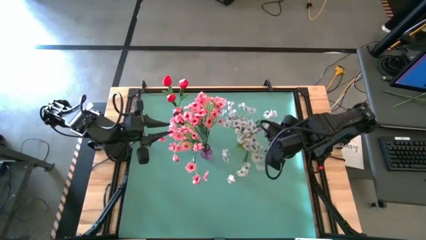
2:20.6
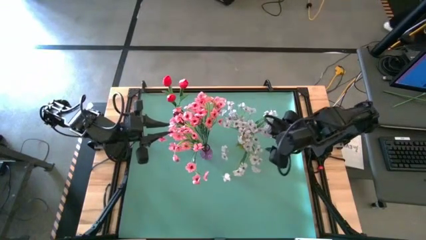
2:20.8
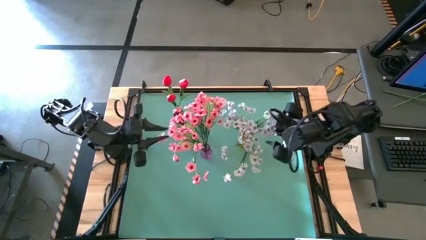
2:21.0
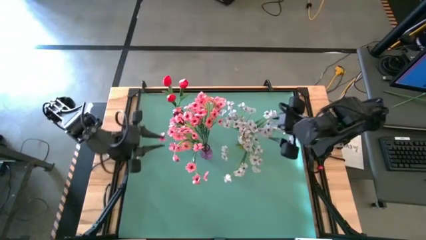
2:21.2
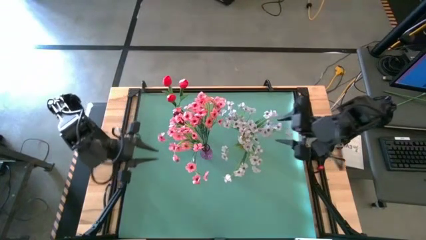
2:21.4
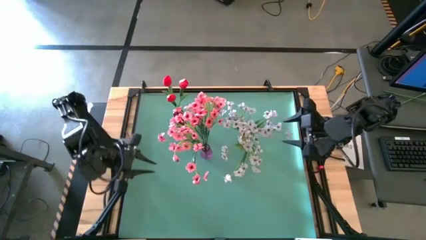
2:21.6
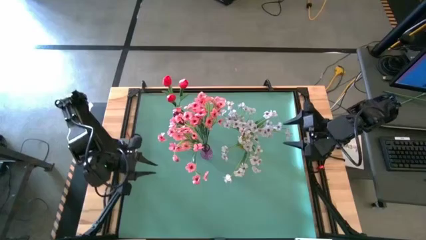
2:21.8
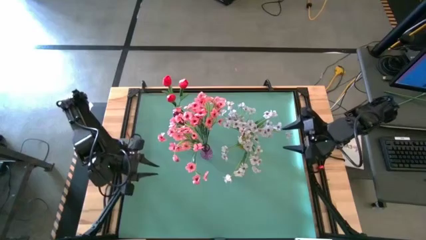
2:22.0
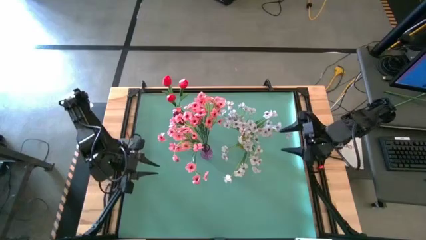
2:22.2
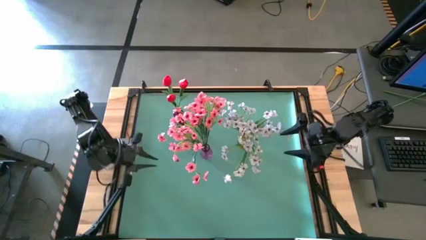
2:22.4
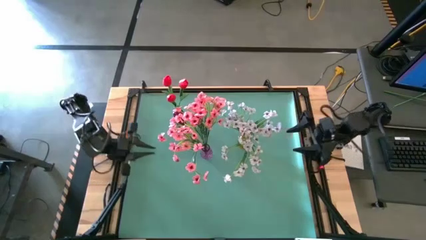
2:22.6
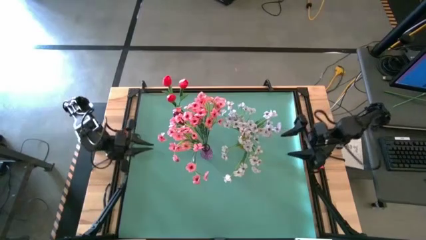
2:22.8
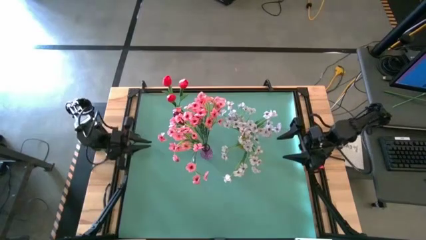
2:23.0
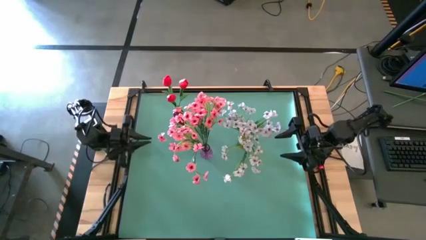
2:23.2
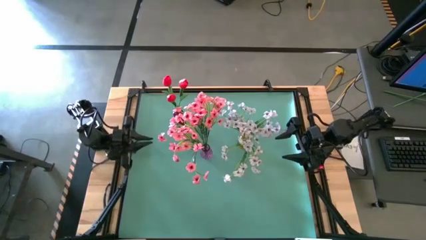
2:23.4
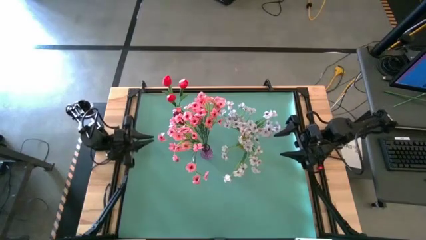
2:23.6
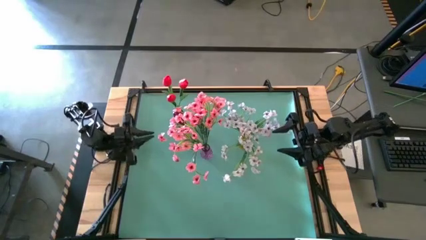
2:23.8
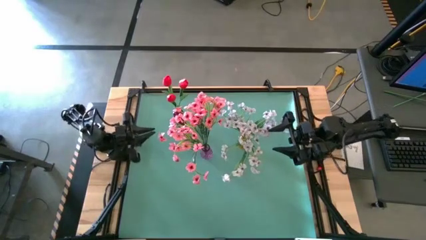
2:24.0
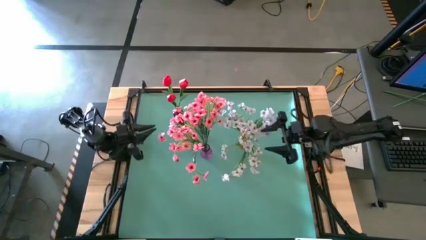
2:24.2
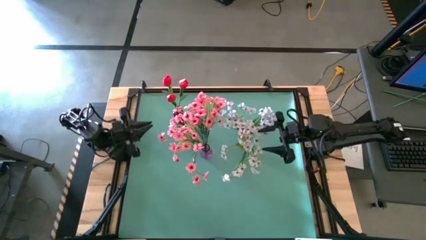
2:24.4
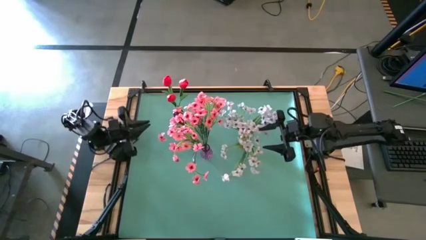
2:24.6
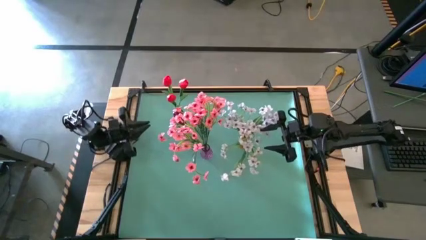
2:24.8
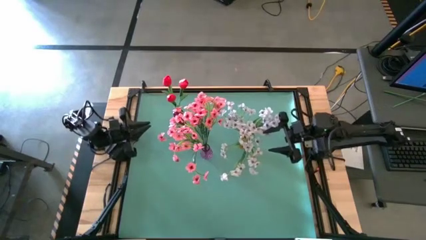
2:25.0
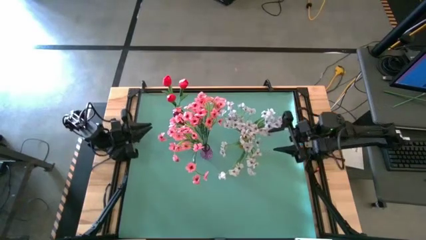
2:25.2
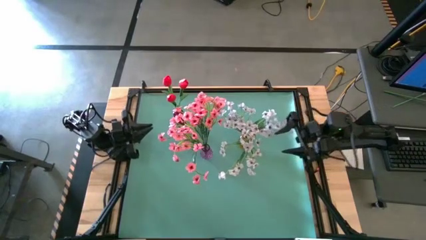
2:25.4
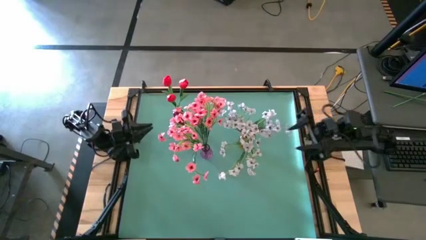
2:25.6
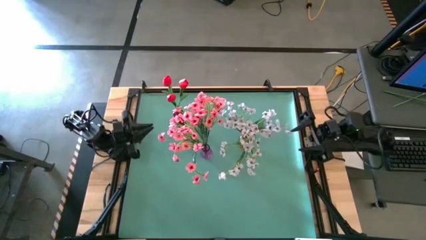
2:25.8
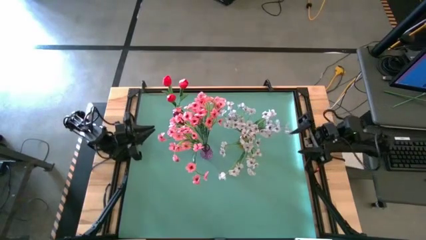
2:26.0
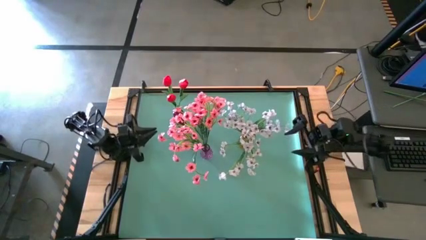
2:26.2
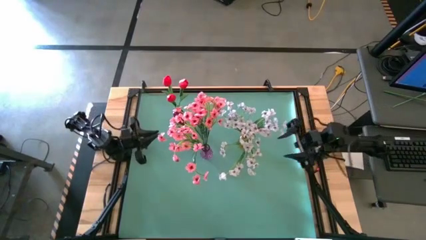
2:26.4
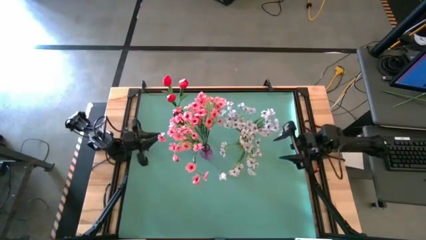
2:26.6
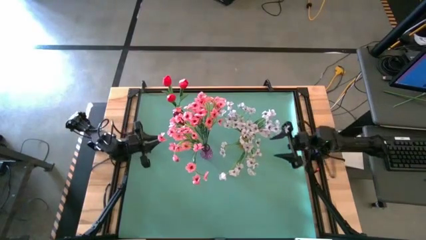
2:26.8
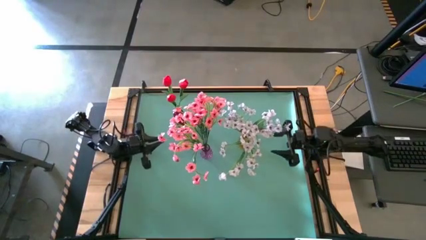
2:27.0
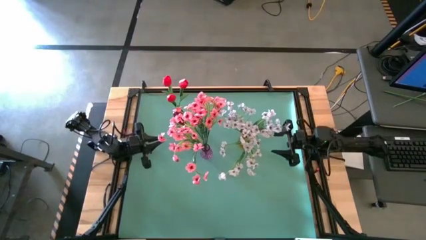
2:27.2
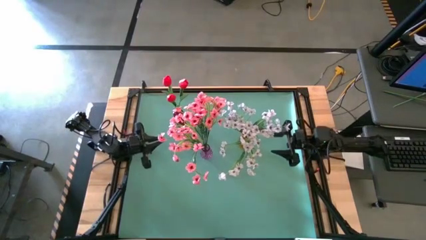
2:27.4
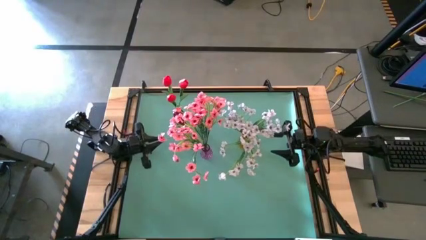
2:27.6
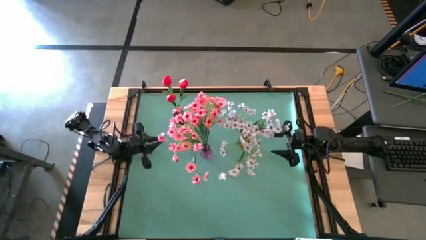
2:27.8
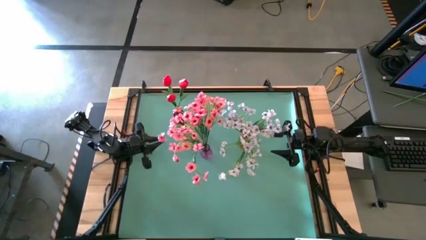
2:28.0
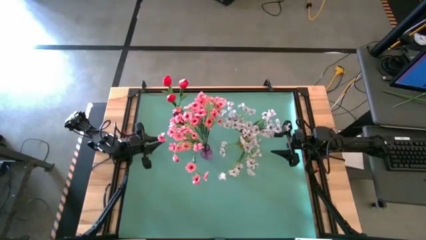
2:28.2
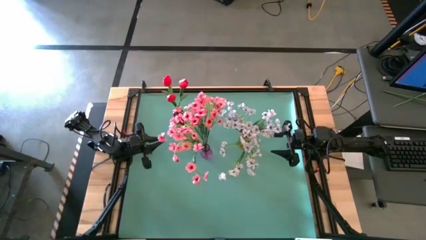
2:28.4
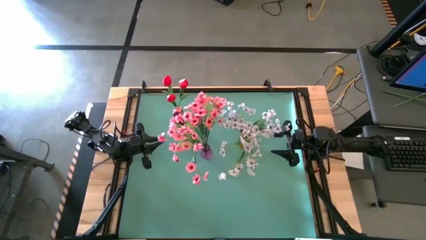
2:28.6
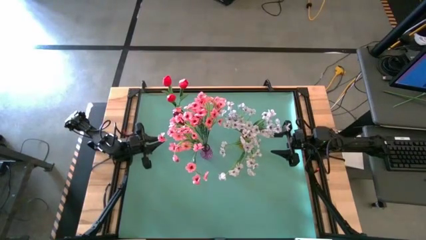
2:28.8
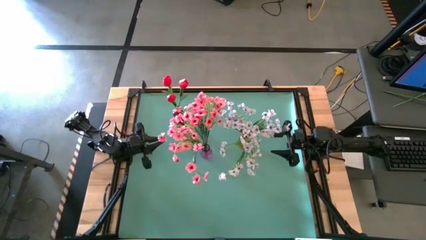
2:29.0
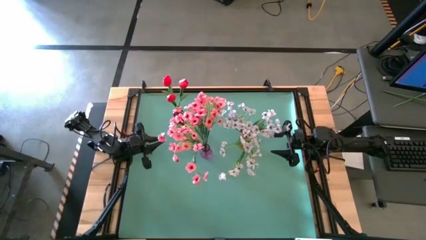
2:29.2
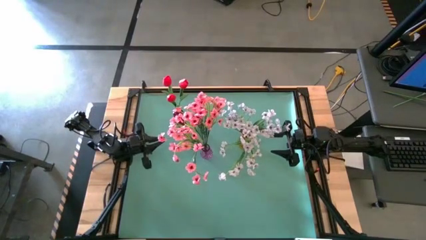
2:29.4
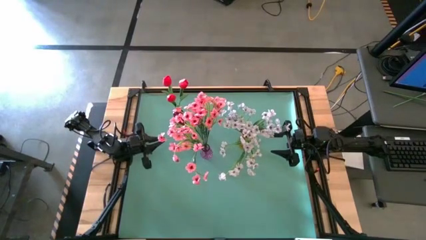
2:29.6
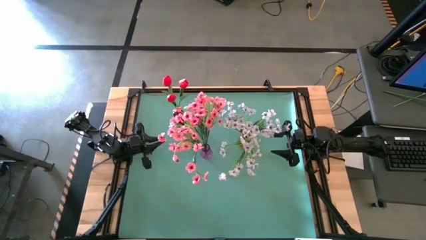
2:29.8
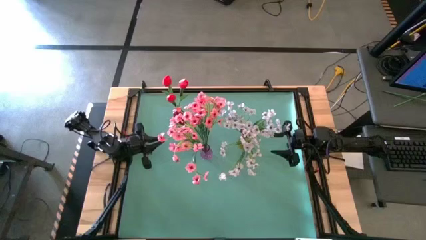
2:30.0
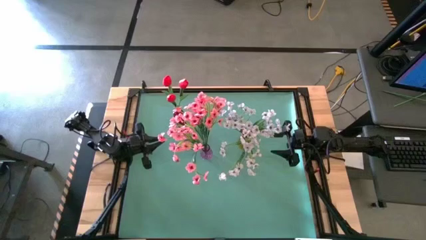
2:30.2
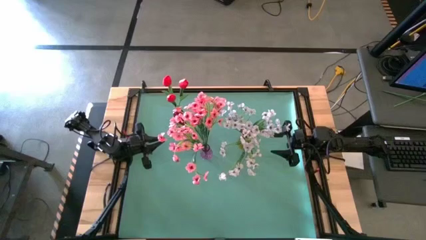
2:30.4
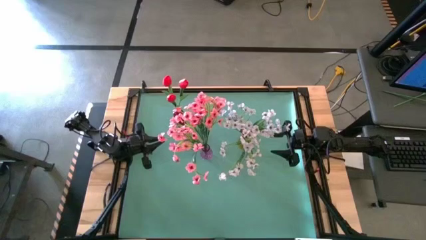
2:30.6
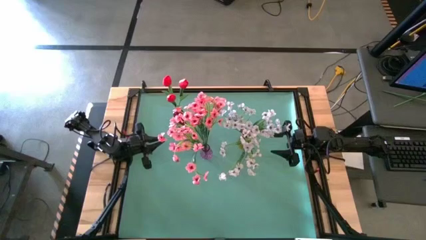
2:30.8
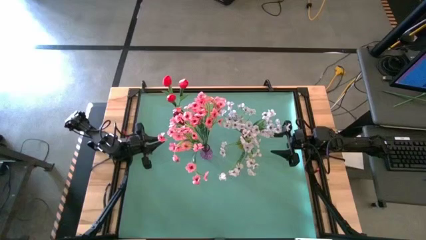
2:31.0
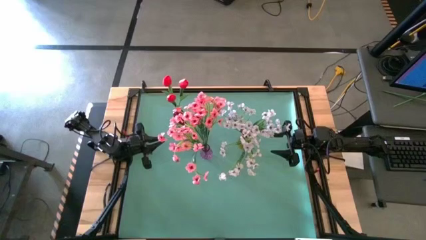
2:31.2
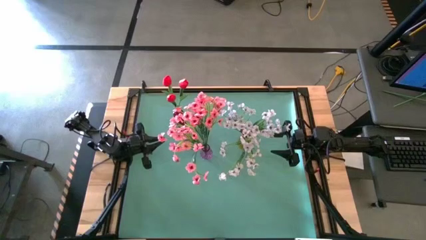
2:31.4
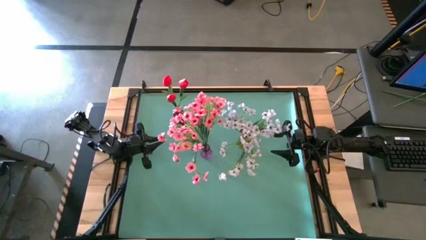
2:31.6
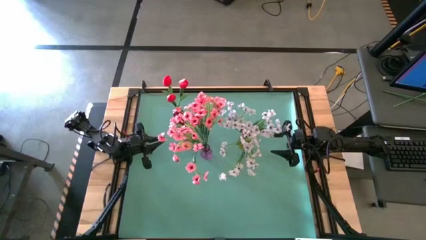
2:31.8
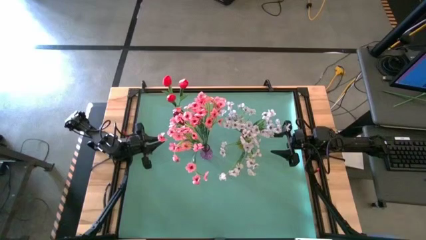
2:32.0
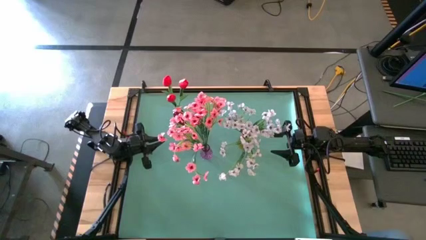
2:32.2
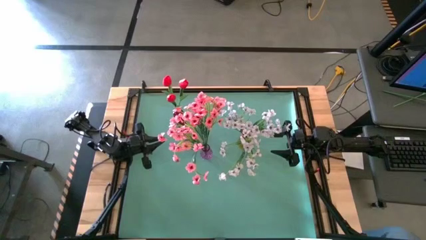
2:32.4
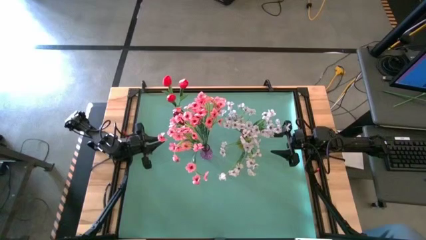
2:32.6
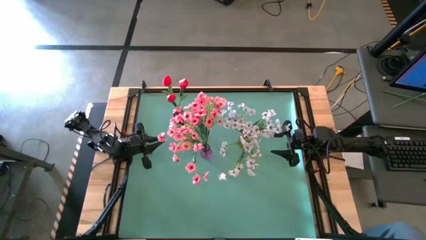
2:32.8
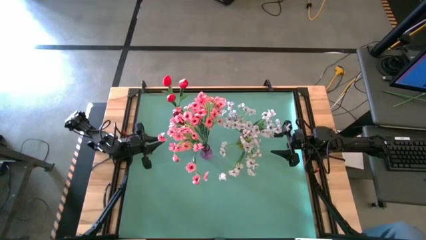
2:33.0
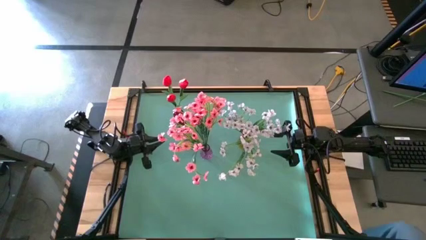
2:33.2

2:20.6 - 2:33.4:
Task: Sort flowers into vase by color
Return to Home Position
